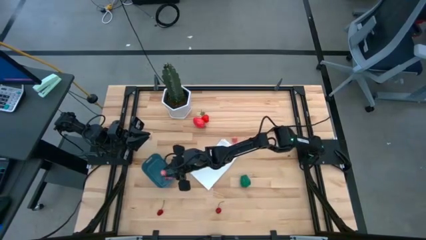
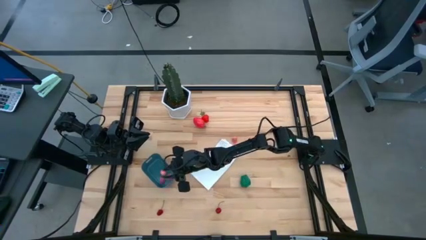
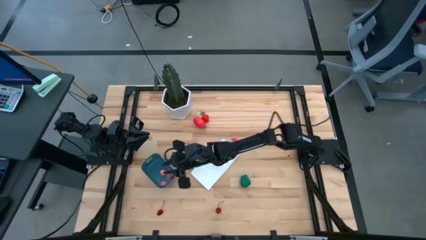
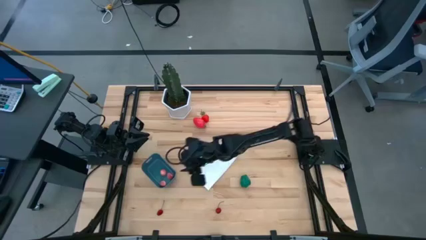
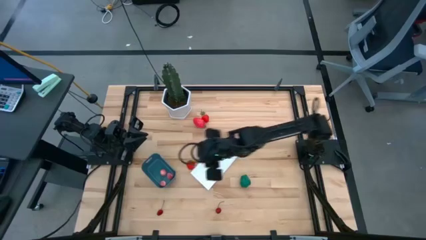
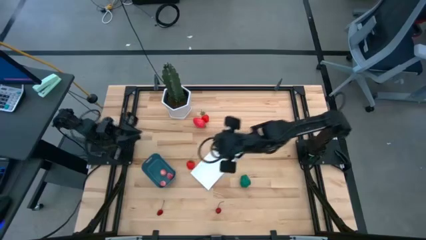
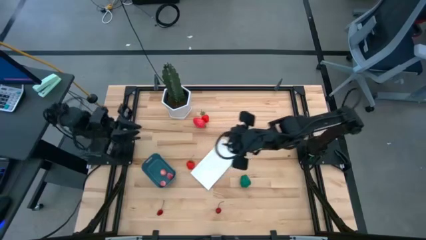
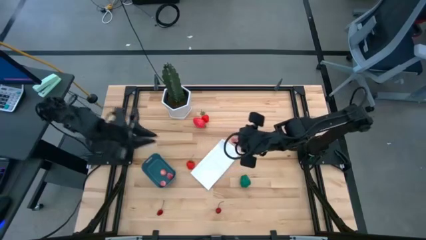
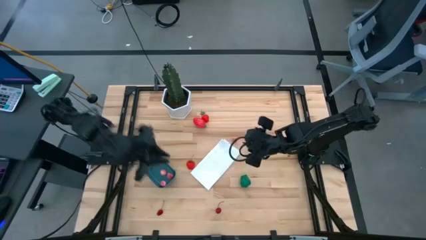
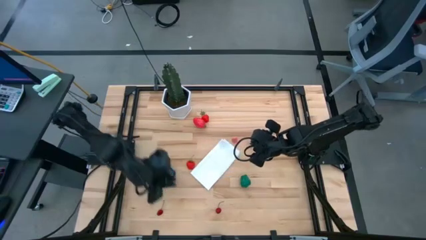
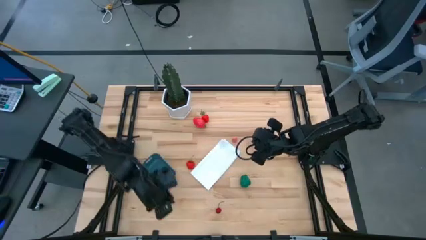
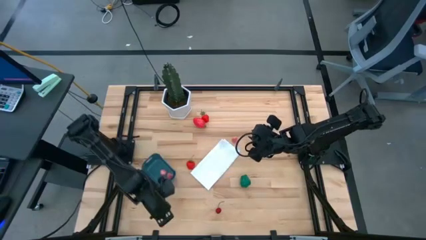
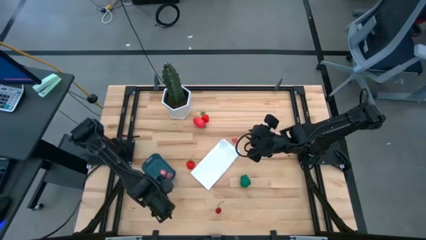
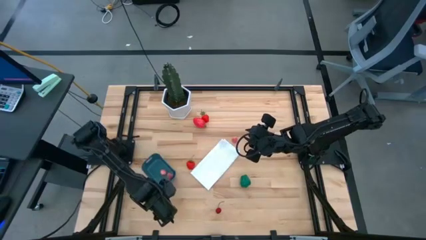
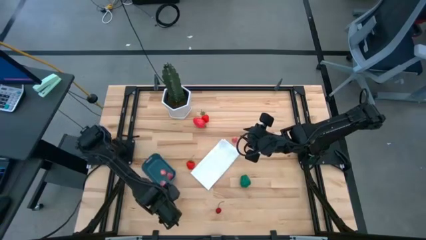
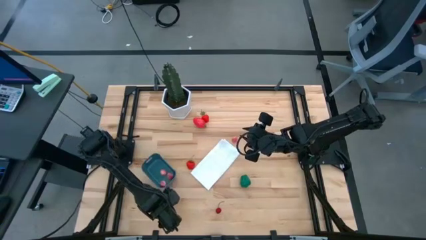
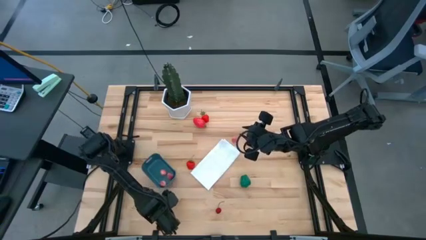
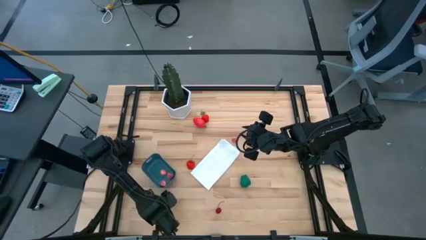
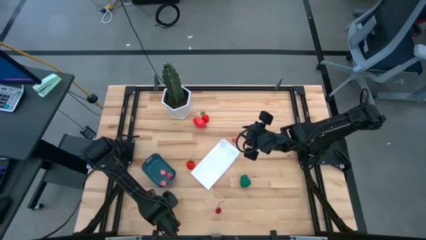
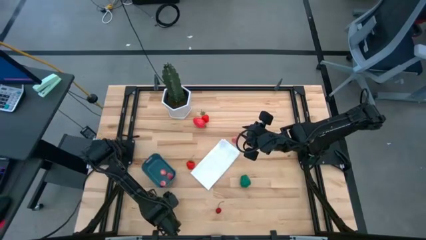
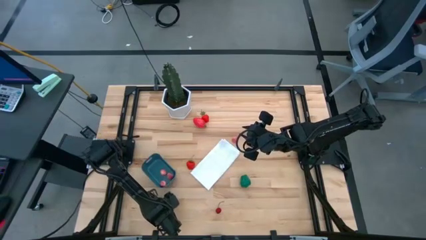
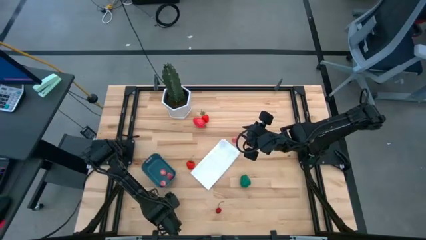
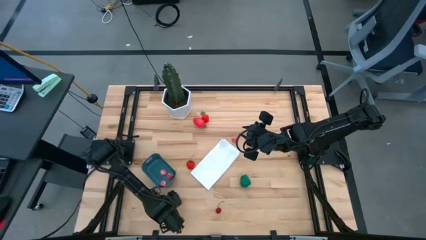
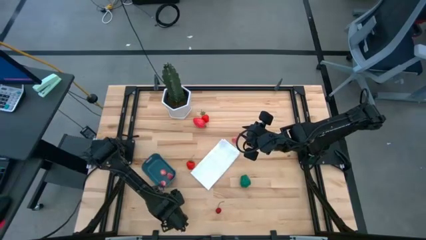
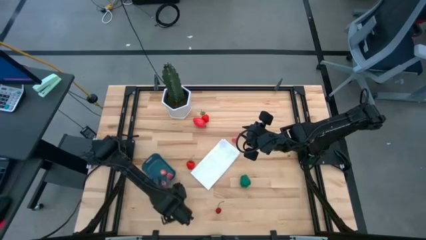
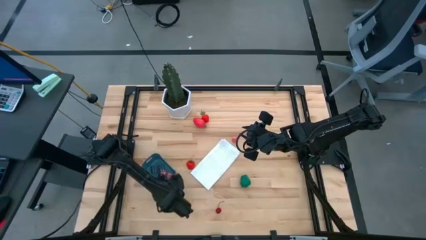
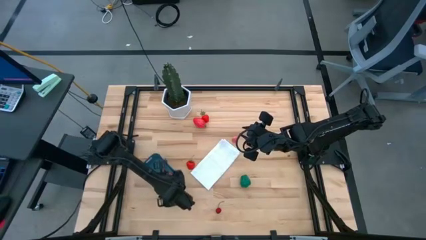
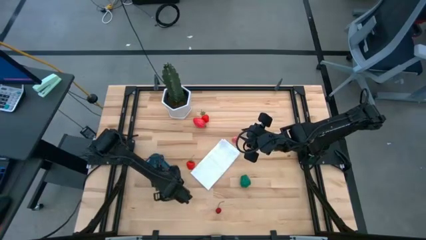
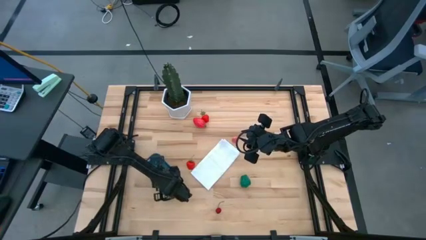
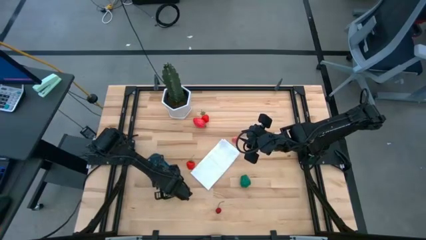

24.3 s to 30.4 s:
Task: Pick and placing Produce into tupperware
Put the cherry into the blue bin

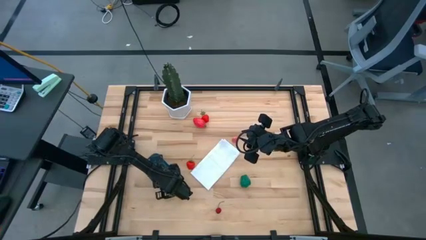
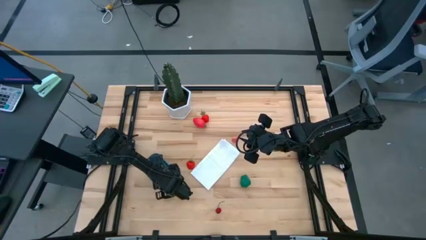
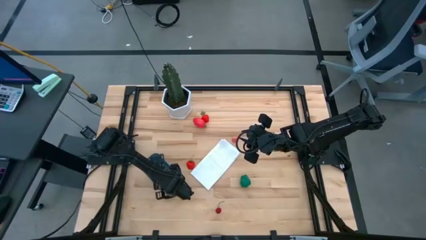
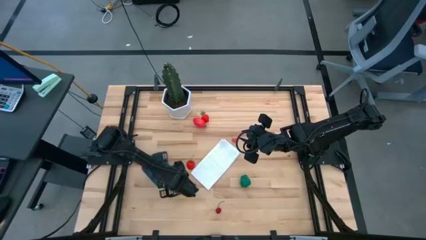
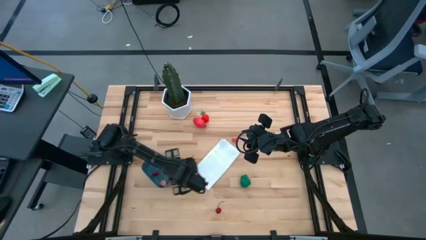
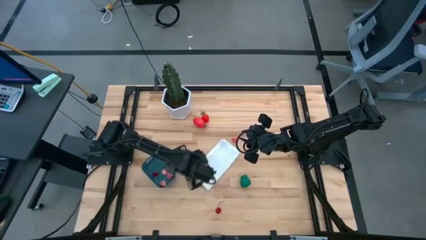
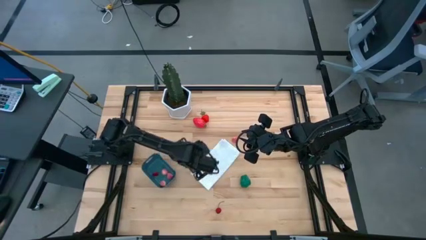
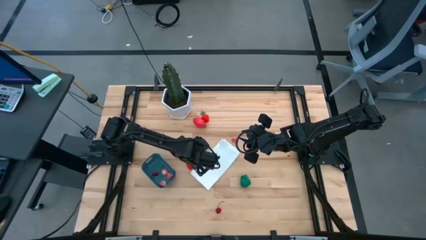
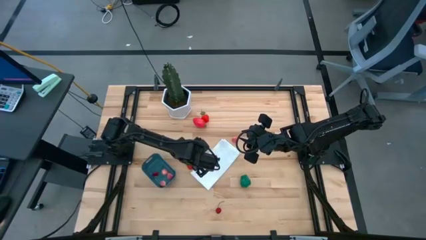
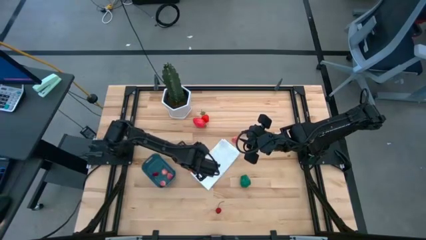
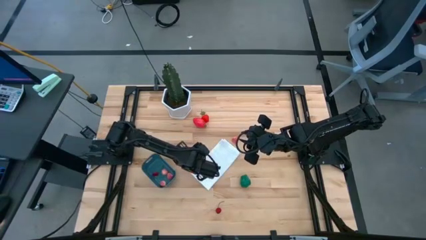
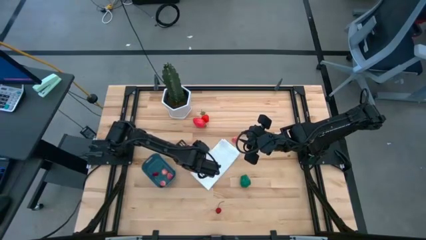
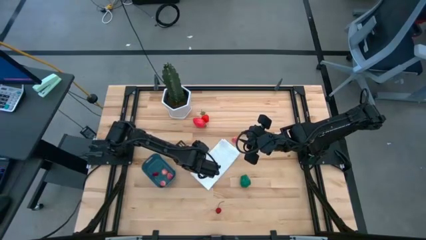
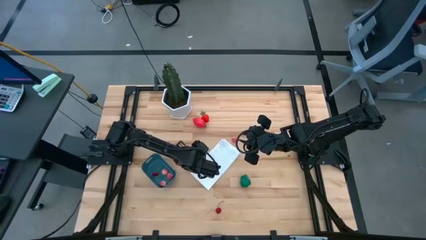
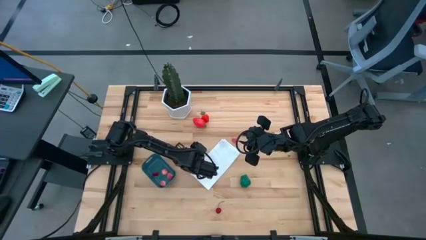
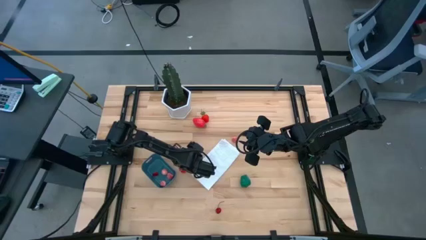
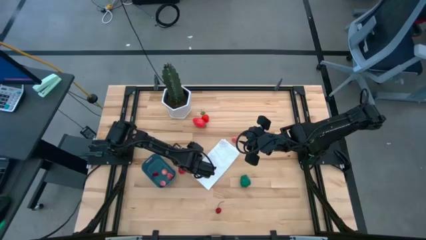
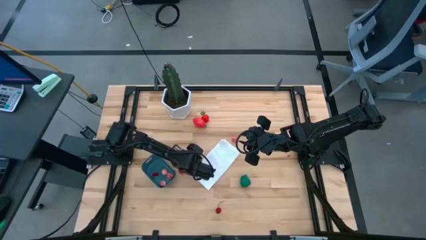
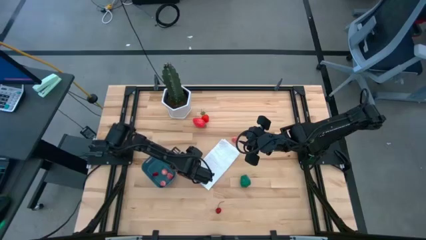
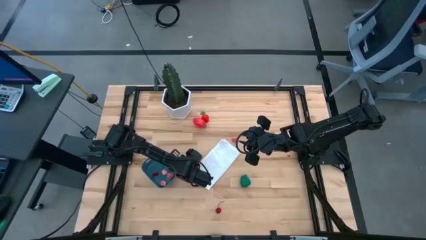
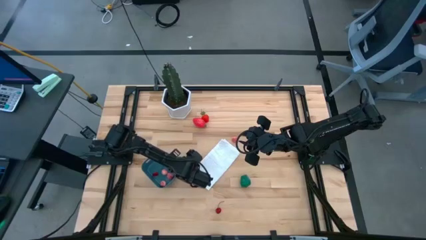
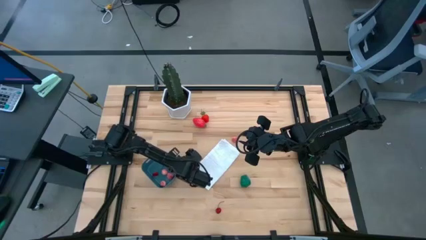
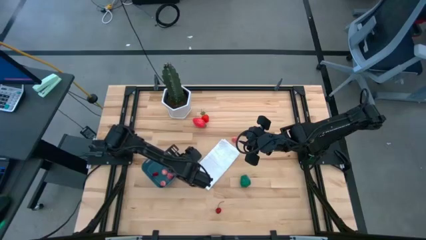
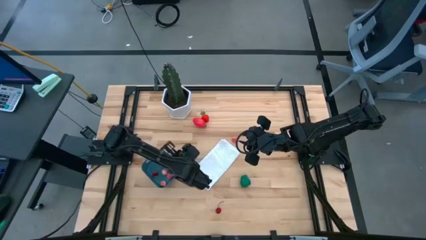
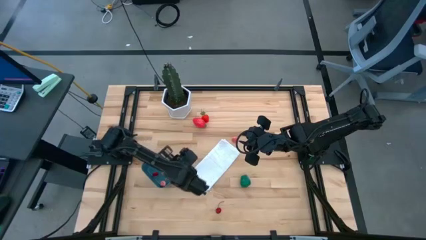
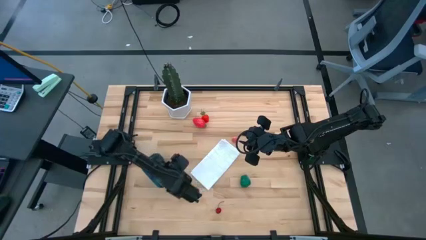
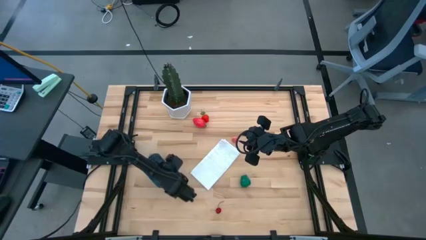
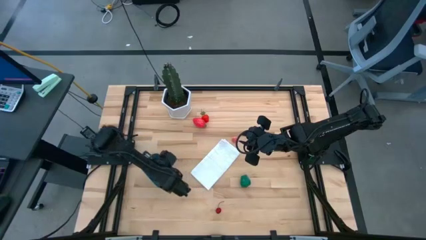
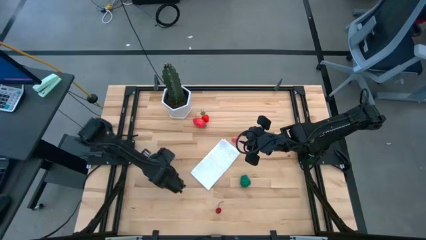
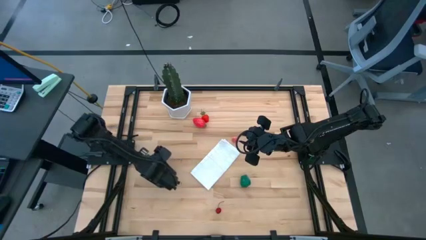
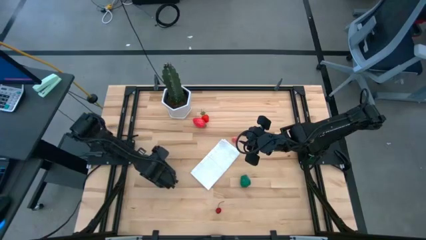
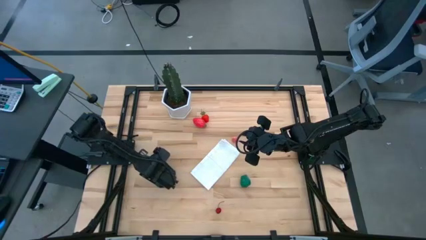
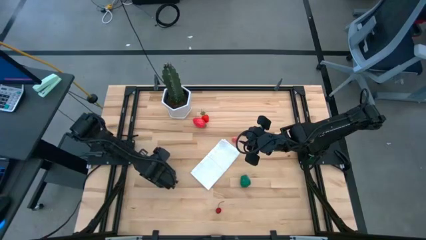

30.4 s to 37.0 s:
Put the strawberry into the blue bin

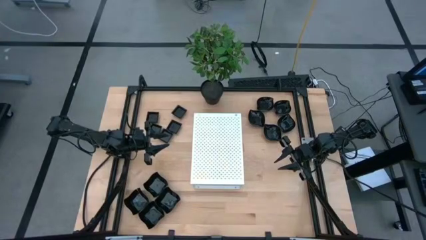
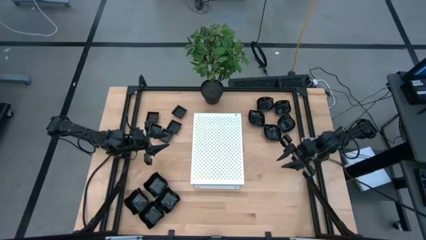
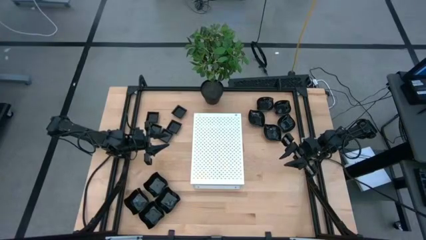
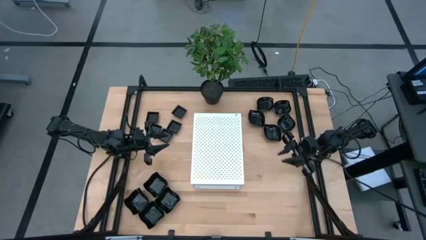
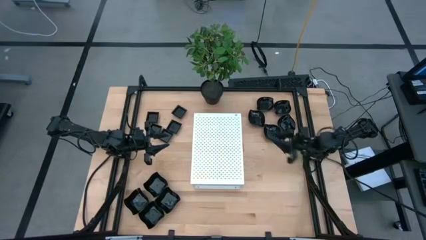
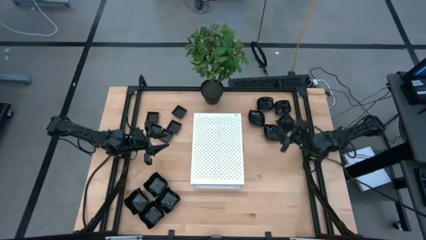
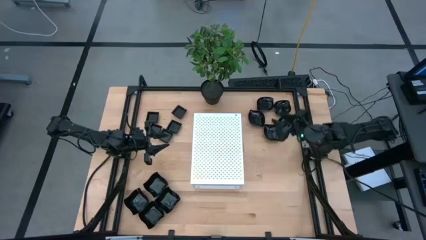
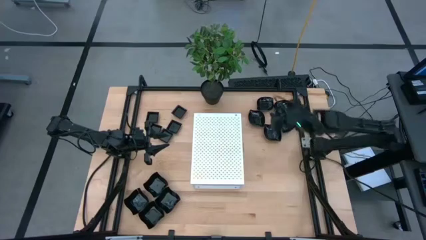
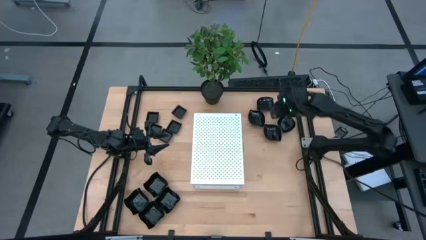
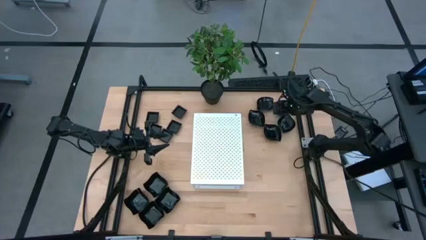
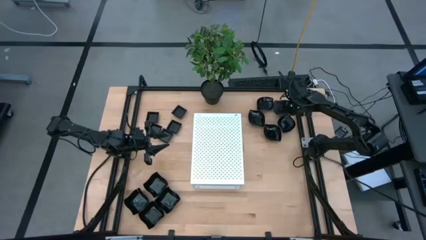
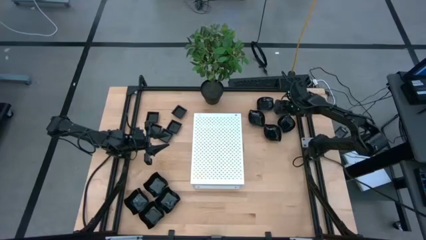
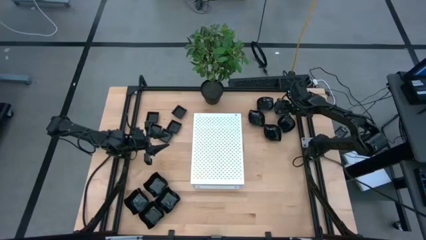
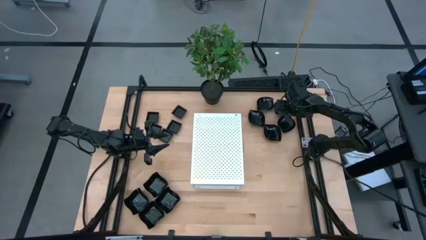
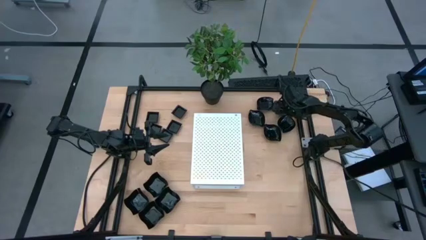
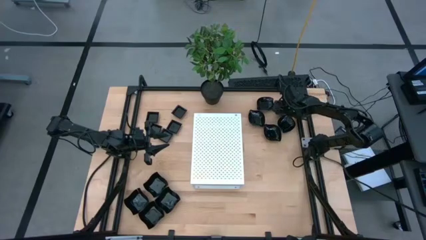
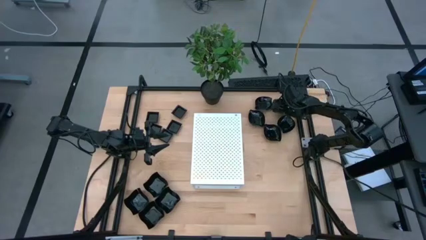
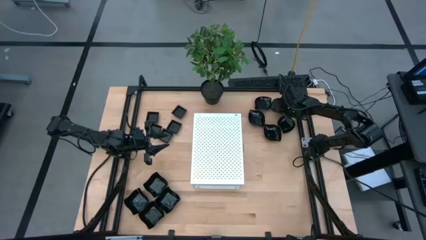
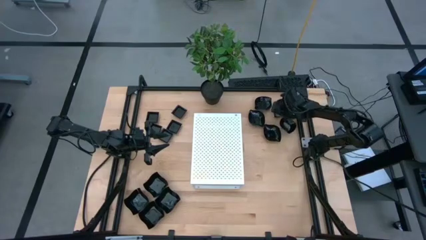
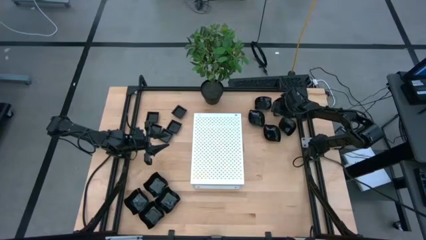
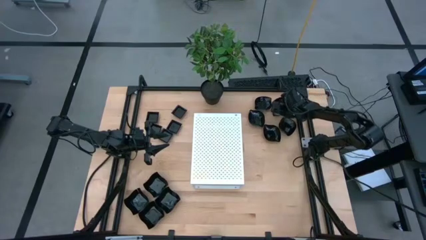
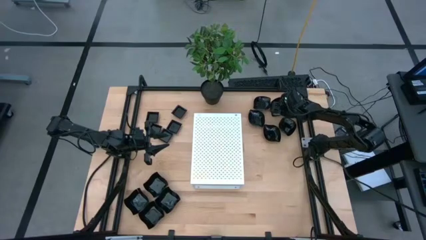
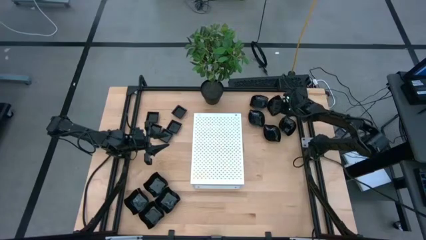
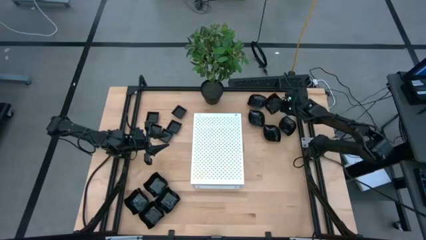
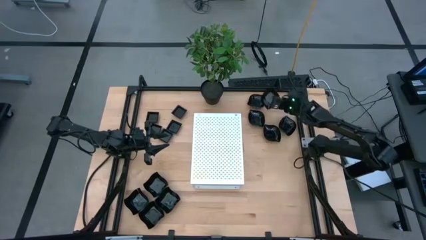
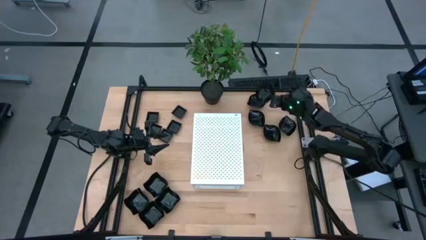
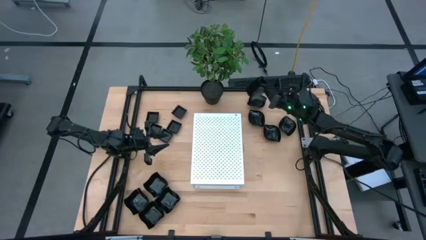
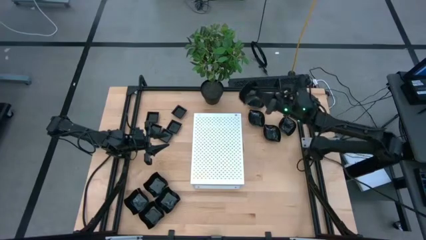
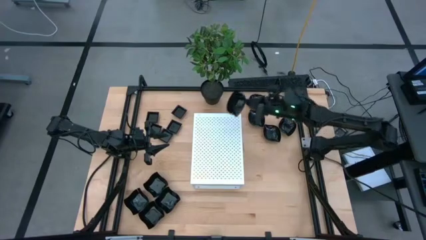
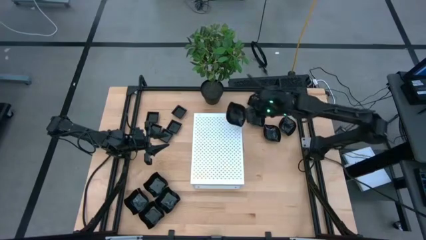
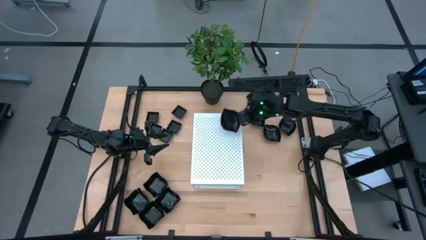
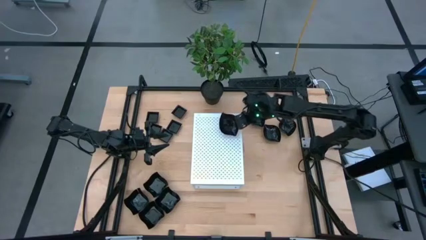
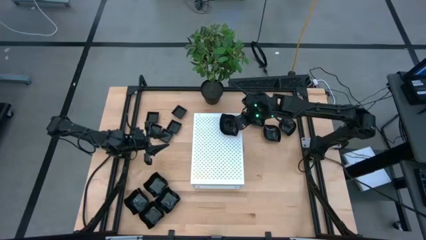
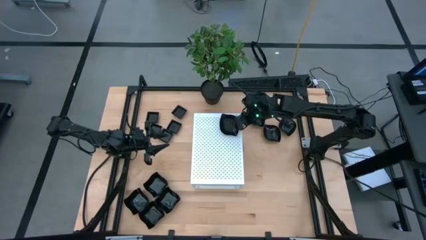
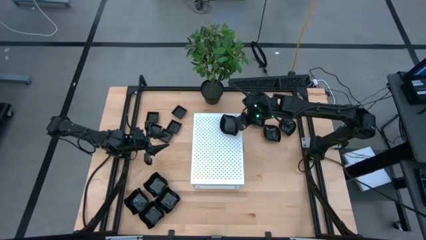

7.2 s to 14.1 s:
Task: Pick & Place Mini shaped plates
Put the black leaf shaped plate on the shelf
